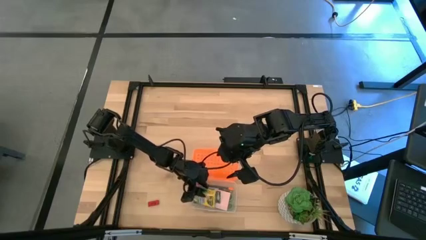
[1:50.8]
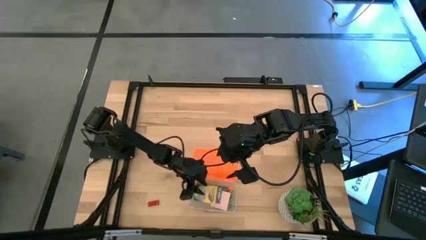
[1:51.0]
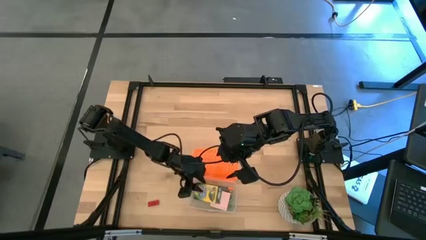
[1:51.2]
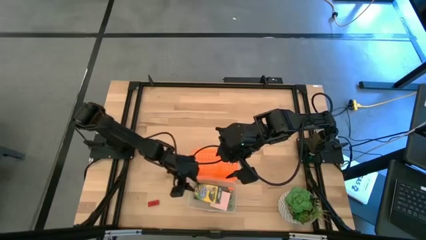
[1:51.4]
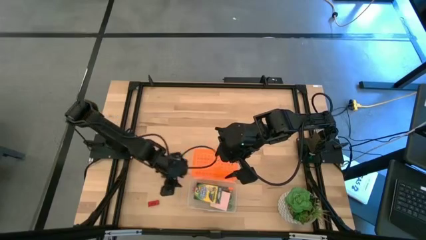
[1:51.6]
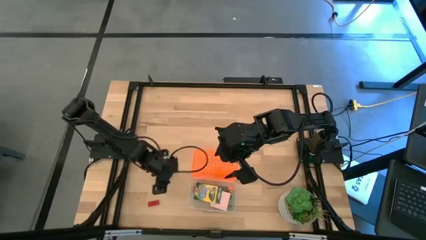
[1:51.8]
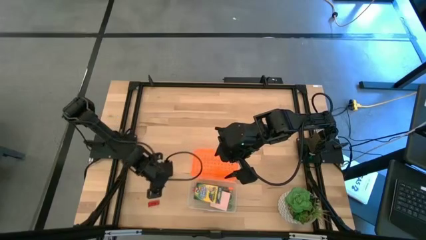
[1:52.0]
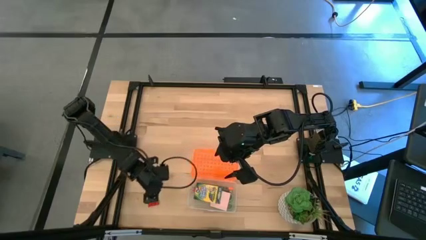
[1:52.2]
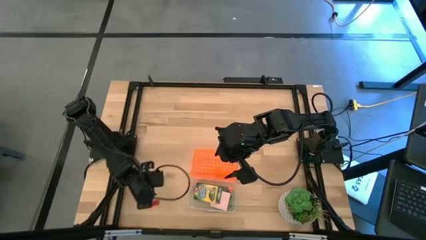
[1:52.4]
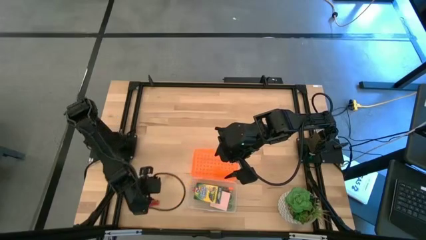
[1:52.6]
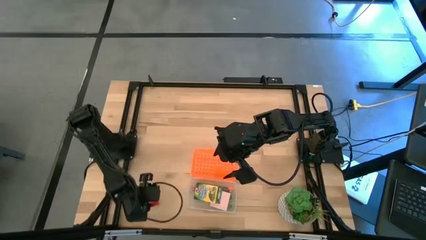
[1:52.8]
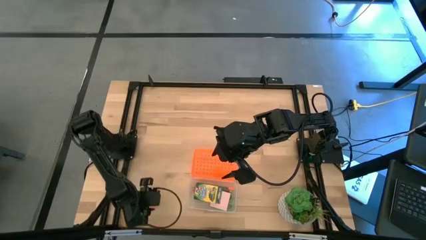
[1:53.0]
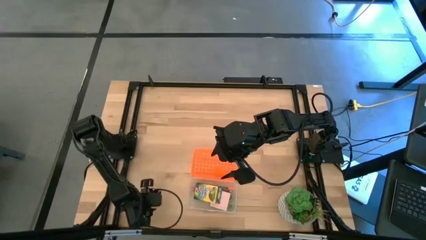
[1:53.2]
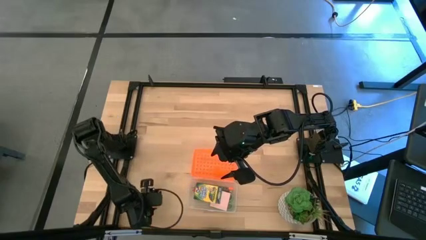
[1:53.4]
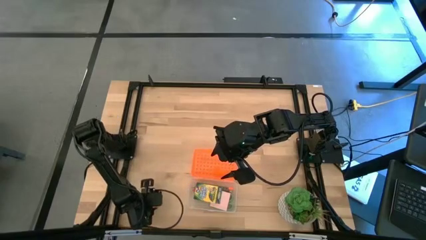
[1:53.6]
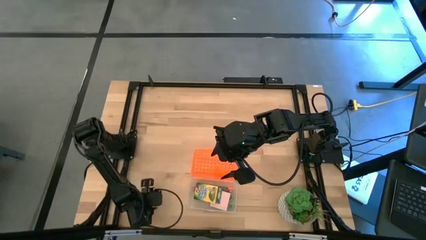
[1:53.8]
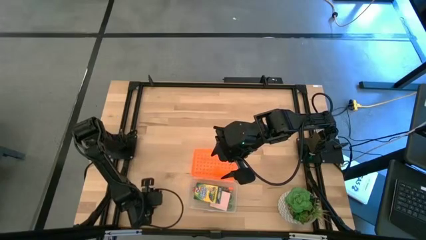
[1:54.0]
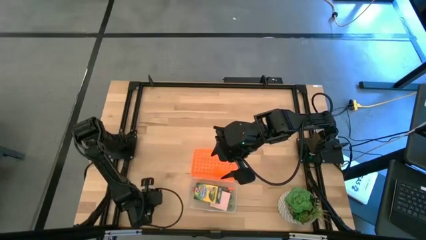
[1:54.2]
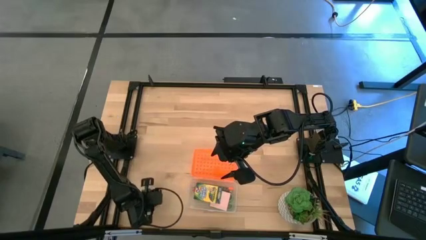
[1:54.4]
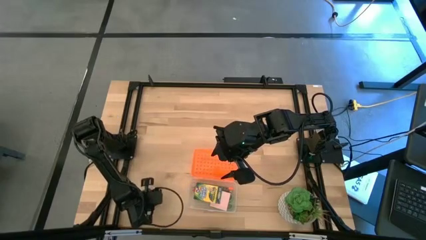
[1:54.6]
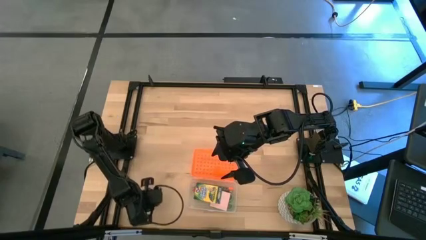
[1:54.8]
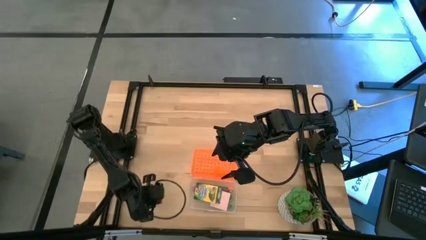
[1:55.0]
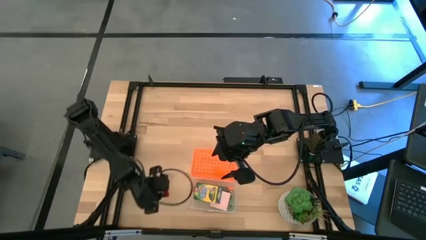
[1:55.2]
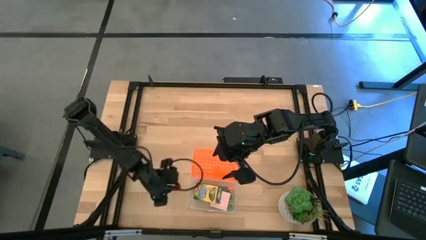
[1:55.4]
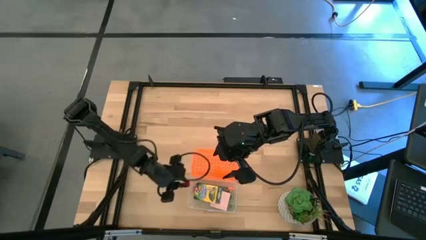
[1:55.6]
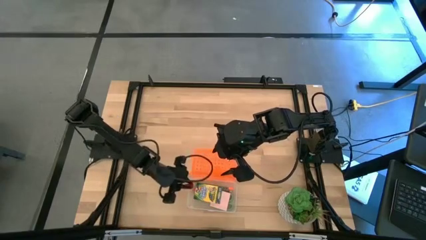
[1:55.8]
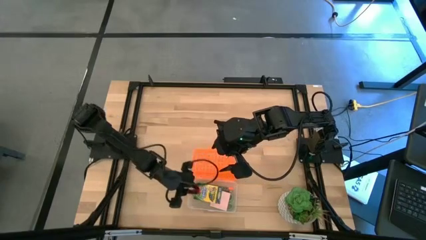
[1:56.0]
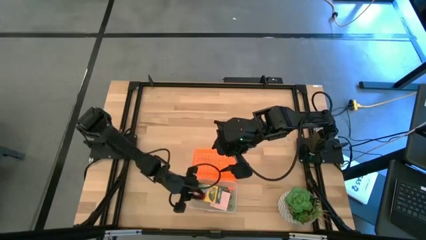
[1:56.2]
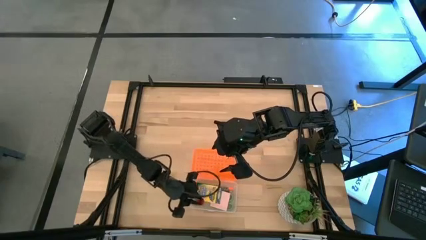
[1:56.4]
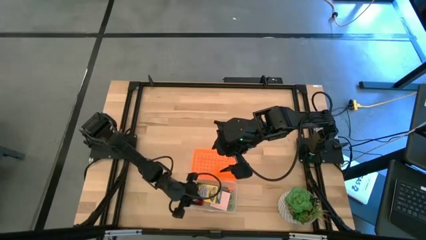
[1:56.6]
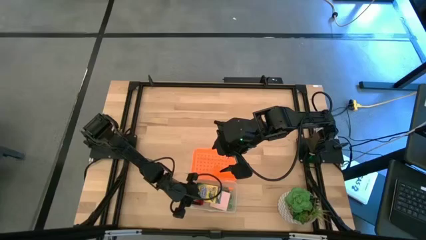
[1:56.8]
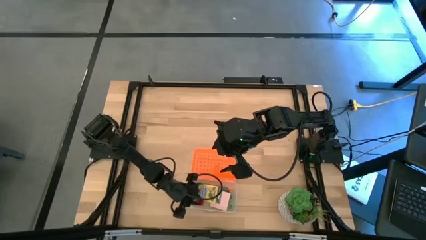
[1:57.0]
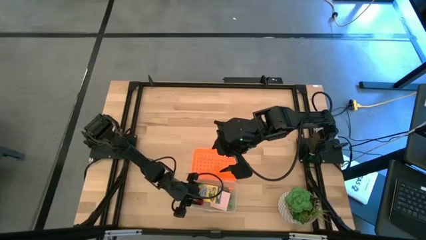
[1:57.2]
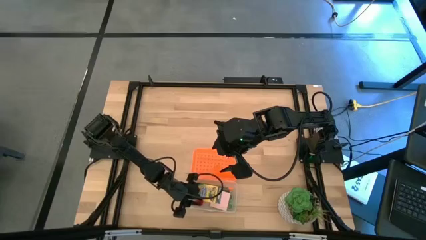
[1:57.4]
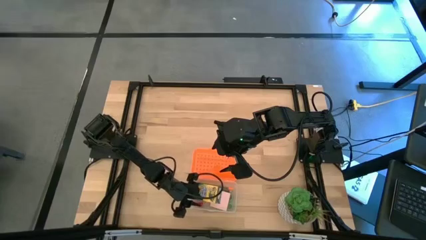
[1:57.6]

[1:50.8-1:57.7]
Task: Pack school essentials
Put the red eraser into the orange supply box

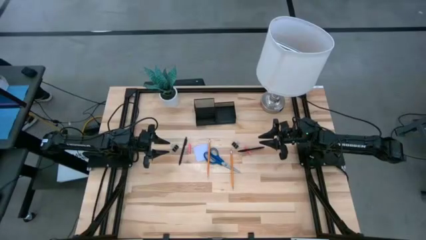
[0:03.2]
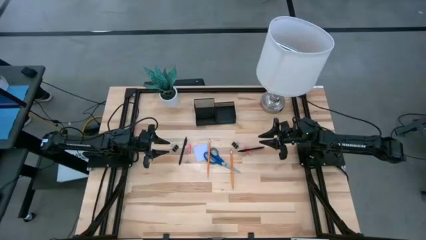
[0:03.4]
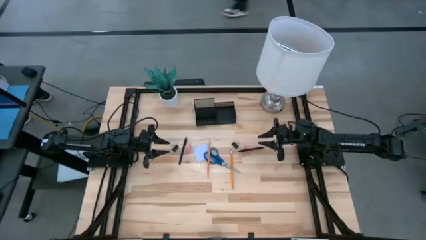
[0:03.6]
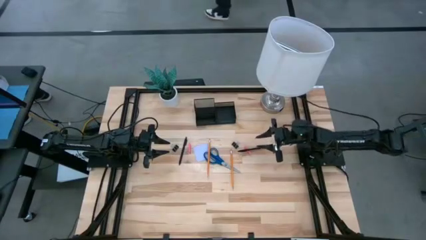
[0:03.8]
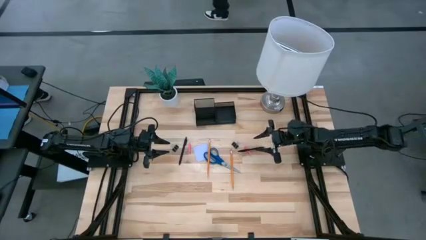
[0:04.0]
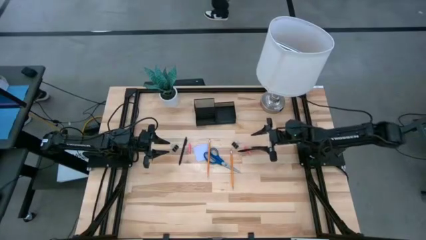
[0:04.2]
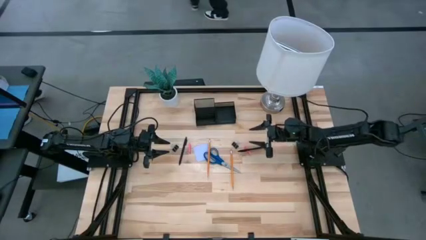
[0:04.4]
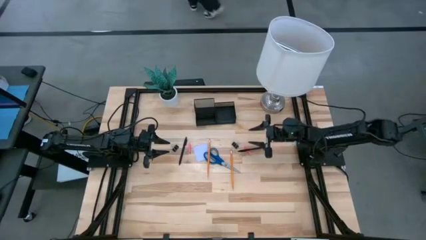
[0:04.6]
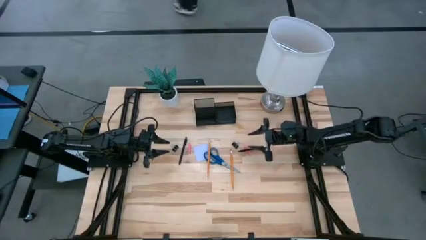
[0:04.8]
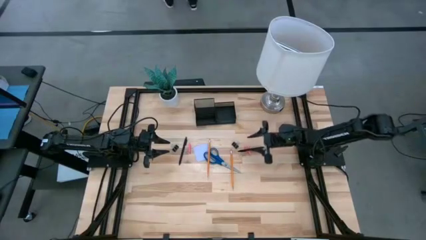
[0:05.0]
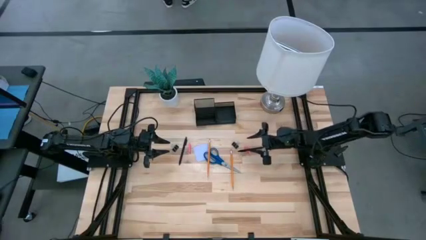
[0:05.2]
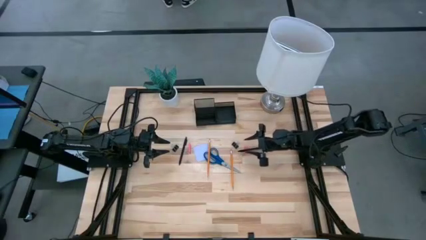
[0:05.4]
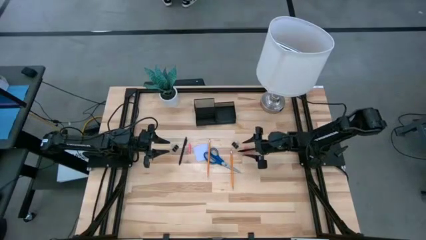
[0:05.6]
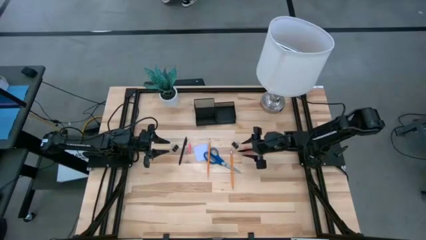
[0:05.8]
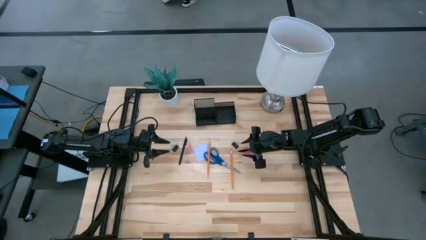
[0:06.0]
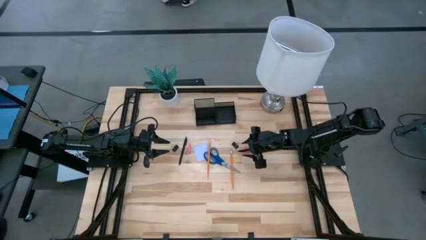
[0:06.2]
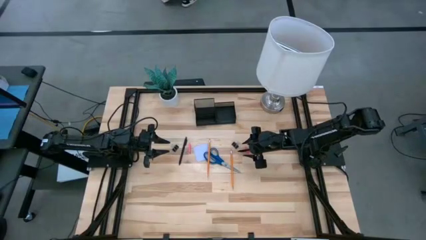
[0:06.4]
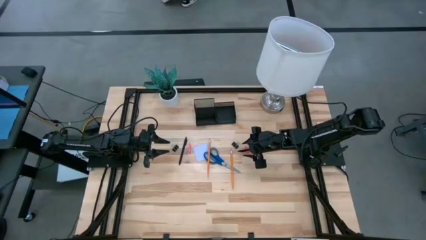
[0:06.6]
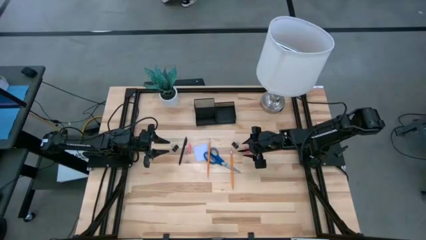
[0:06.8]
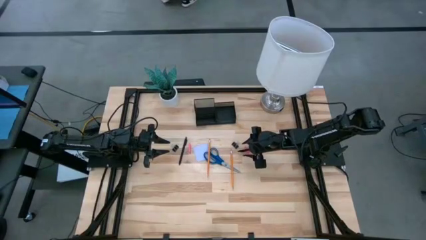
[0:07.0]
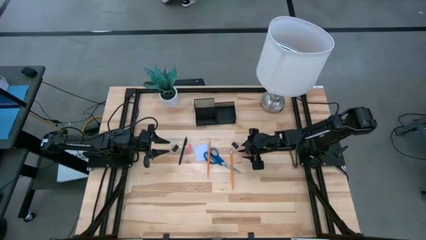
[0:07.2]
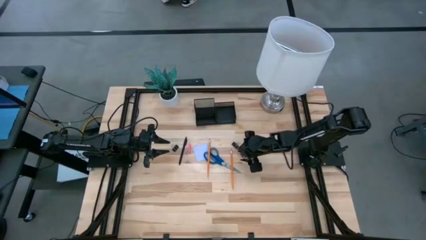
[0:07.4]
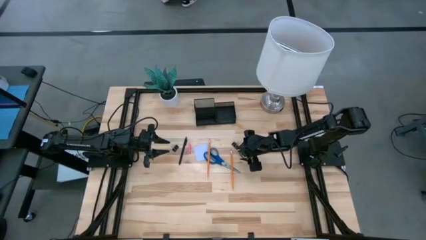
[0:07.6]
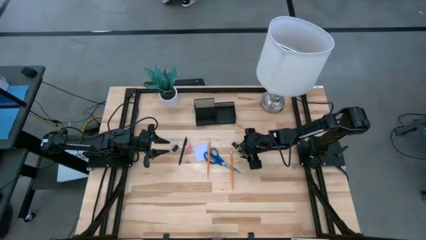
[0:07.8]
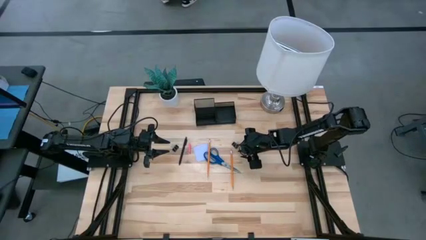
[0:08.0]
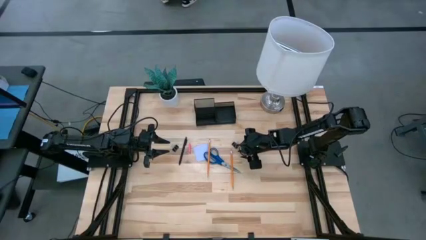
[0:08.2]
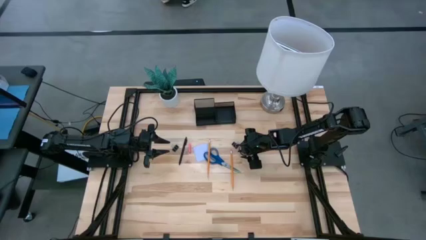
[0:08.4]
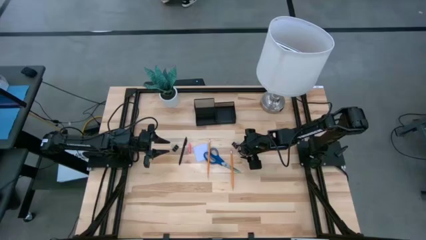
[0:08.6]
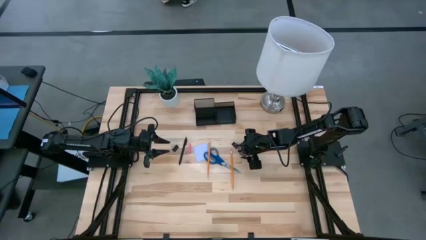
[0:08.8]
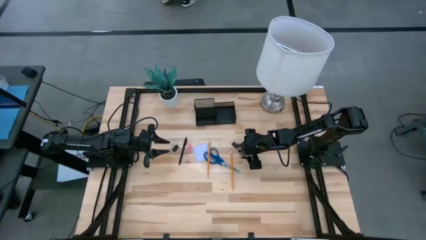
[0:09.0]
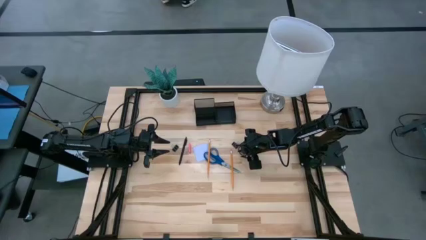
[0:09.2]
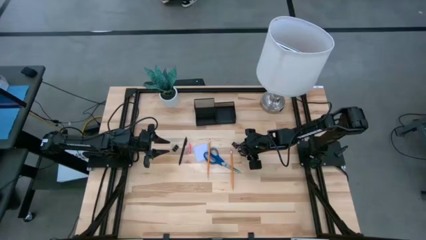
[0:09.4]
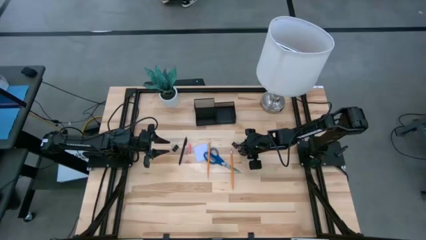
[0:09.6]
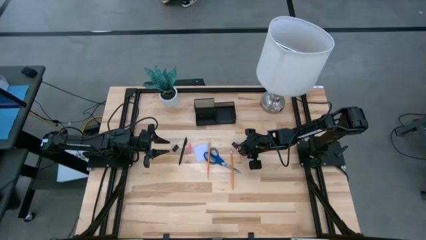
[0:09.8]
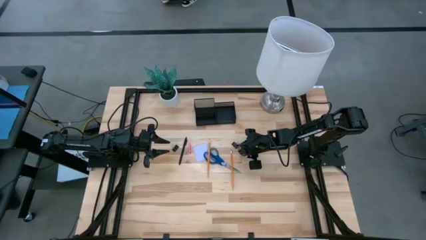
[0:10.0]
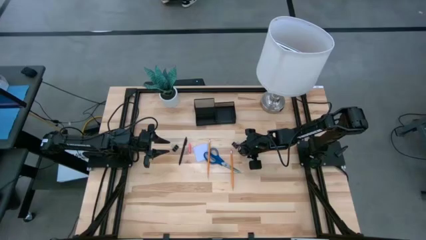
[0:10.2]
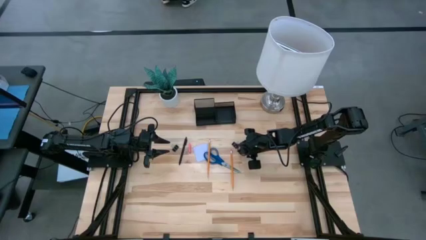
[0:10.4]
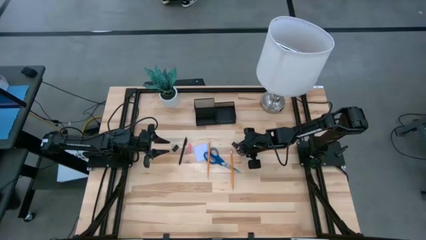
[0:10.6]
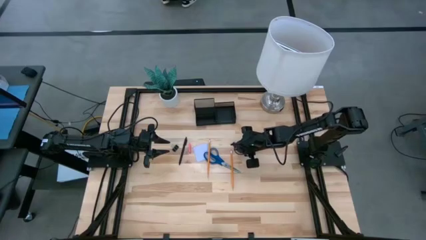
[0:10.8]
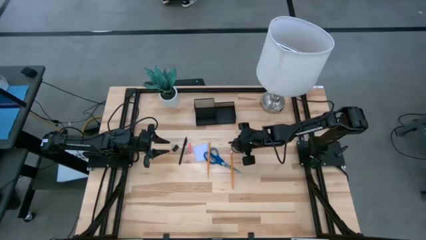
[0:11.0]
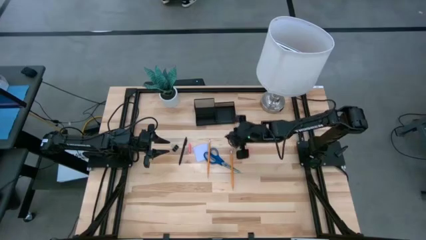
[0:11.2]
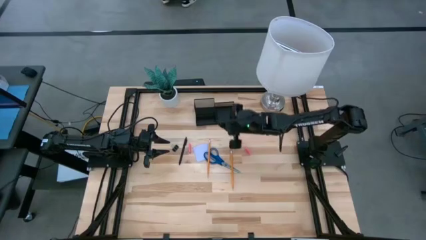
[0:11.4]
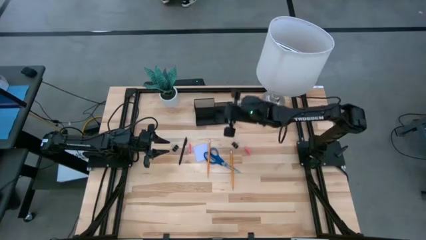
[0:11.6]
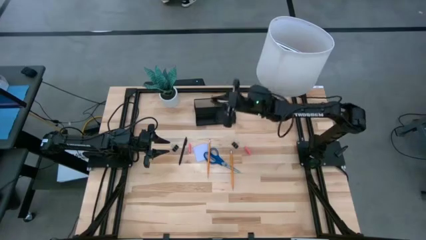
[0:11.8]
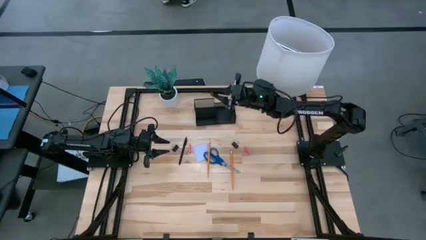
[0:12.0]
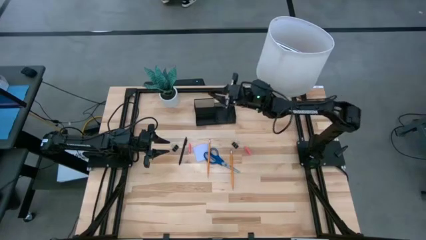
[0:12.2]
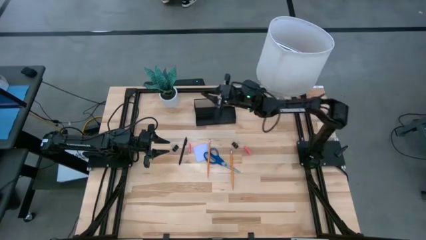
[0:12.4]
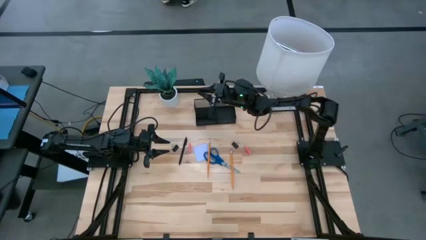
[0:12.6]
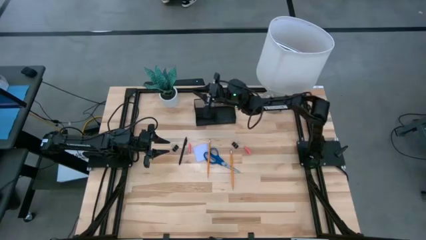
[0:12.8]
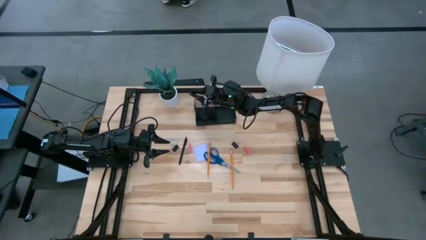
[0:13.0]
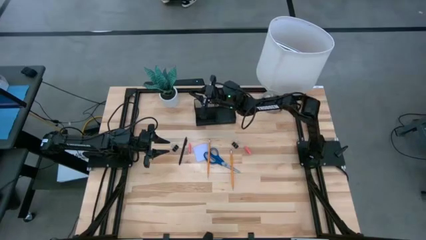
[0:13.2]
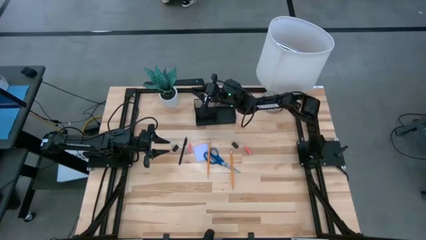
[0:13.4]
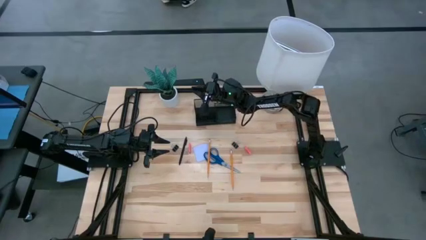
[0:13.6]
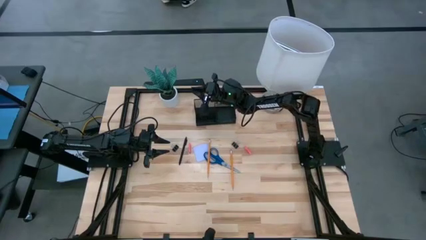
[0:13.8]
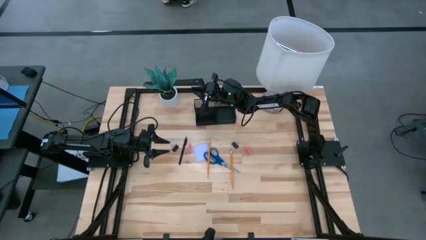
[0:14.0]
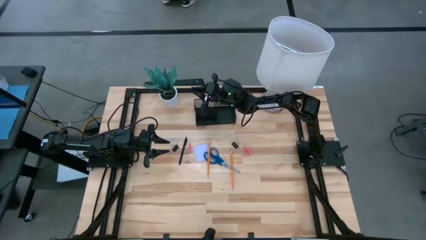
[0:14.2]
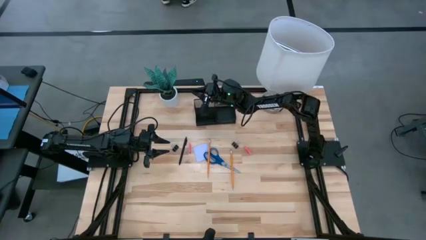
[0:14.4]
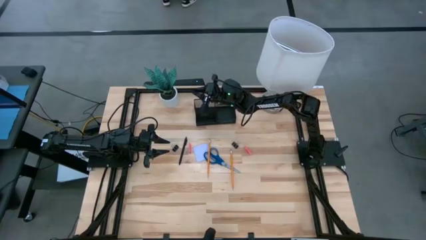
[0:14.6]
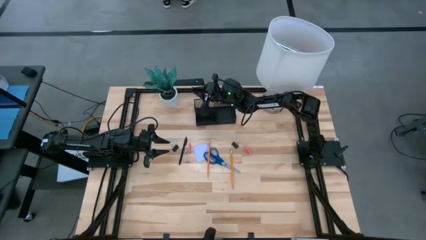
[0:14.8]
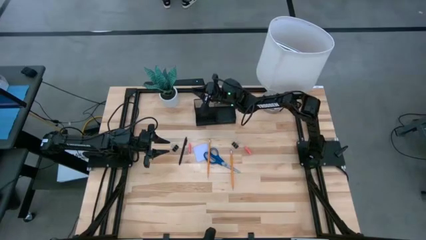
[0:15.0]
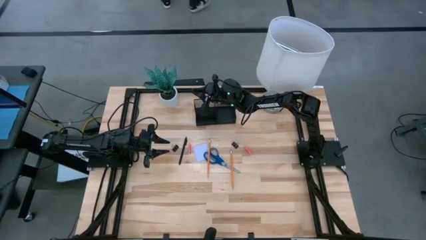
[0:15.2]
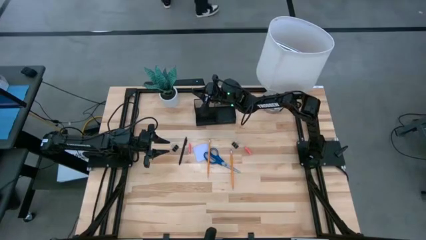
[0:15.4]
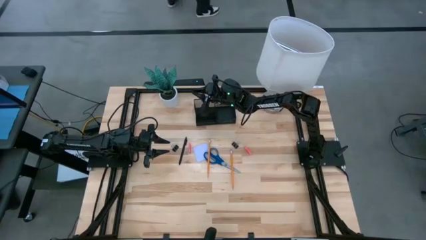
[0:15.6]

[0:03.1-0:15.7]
Task: Pick and place office supplies into organizer
Put the right pen into the desk organizer
